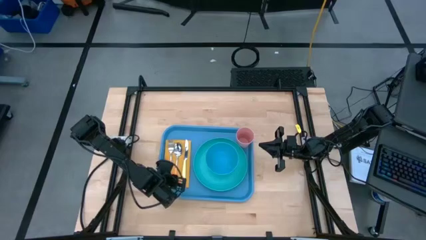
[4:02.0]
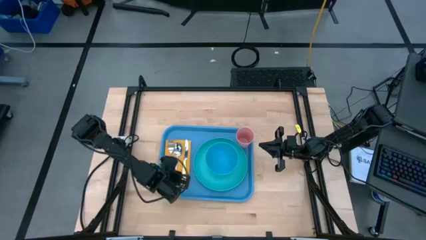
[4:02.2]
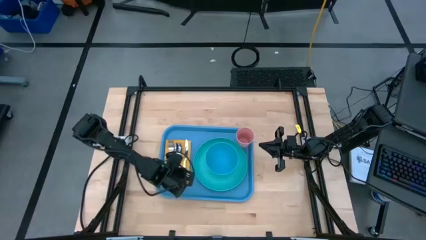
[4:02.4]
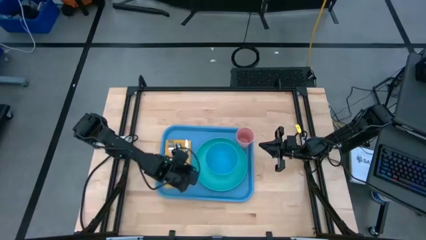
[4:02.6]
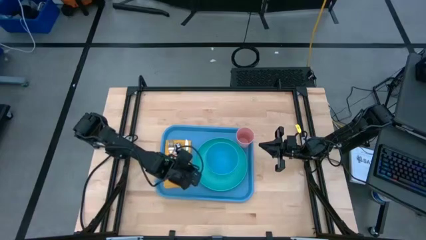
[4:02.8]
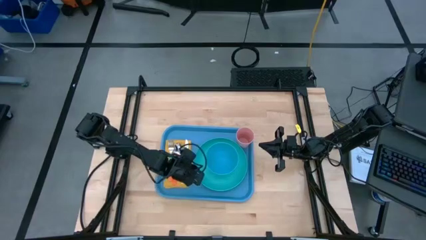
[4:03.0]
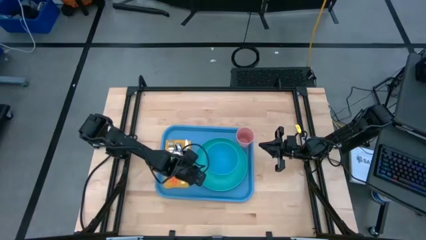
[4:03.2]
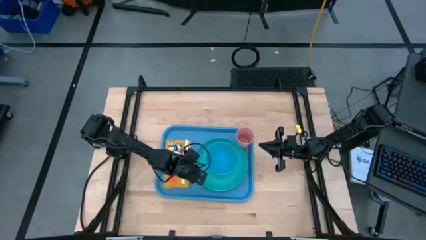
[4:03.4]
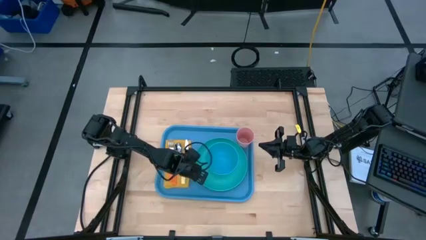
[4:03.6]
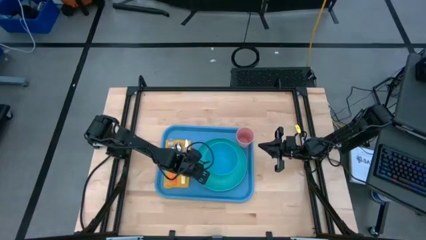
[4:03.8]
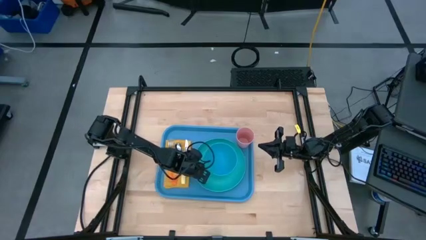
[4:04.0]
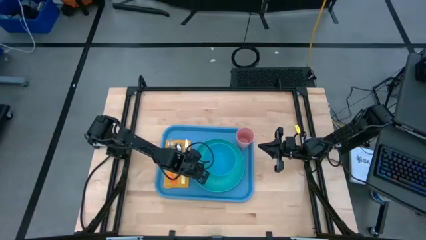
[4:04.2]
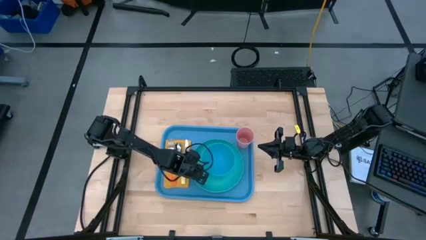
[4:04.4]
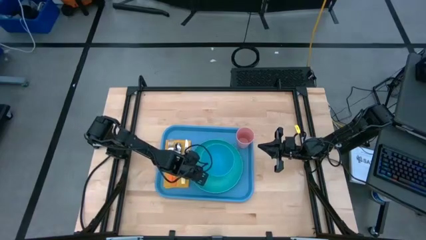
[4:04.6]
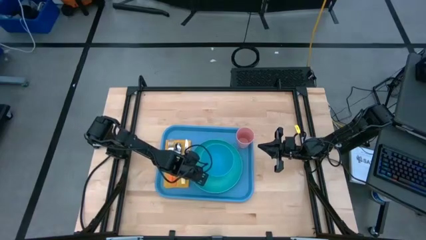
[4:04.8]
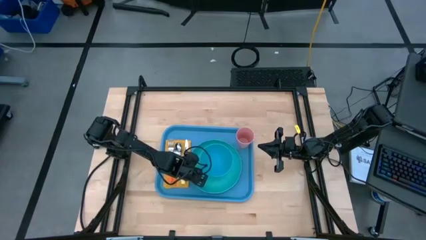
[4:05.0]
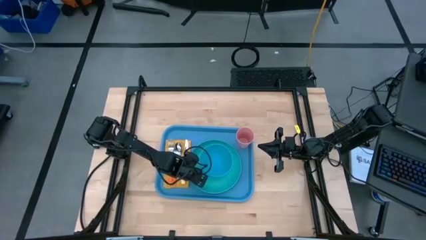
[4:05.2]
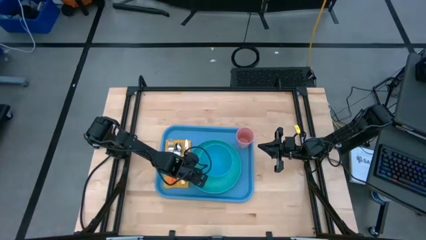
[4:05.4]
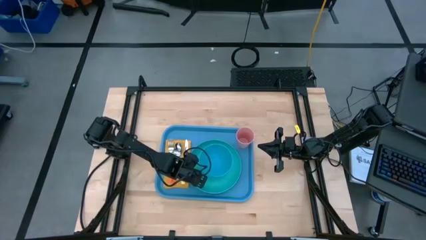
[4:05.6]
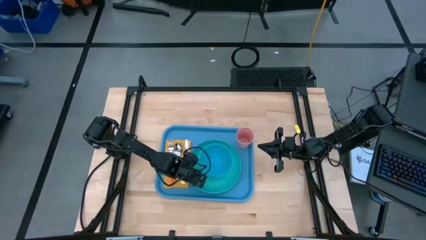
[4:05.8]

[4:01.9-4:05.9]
Task: Set up tray
Adjust the green plate on the blue serving tray

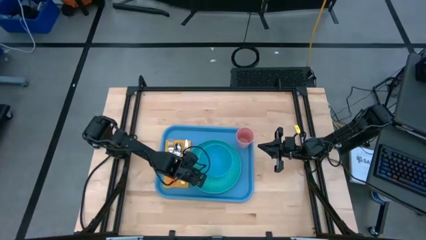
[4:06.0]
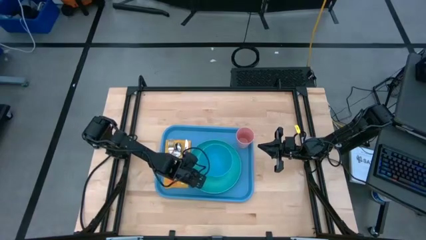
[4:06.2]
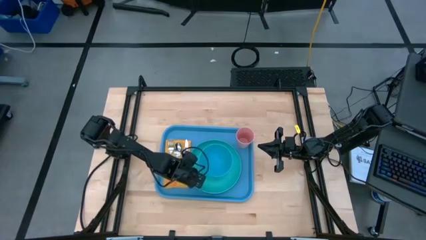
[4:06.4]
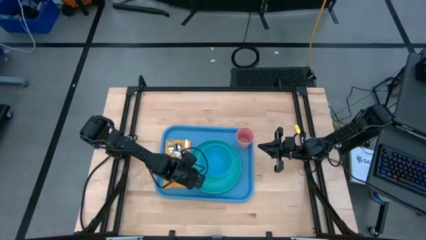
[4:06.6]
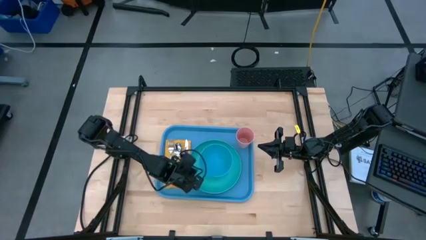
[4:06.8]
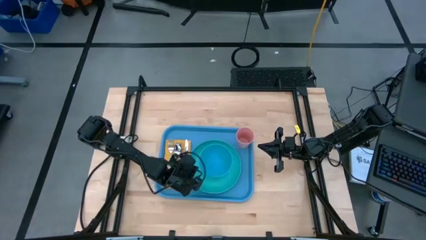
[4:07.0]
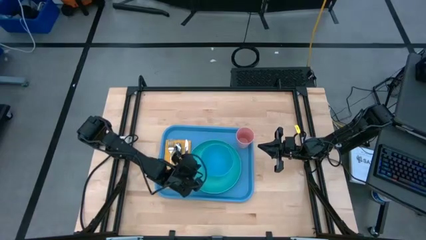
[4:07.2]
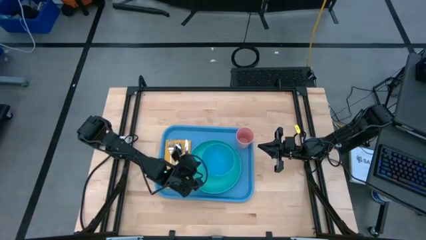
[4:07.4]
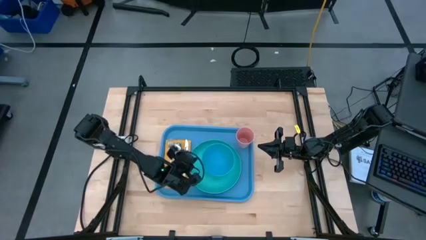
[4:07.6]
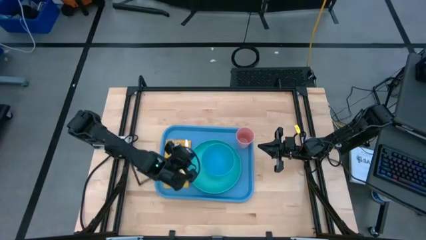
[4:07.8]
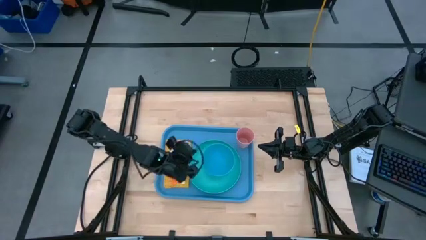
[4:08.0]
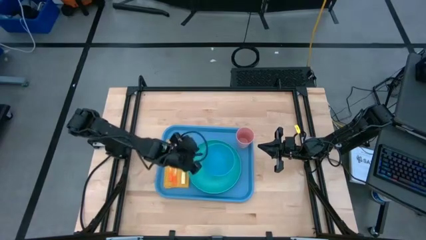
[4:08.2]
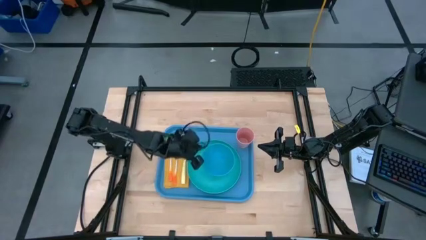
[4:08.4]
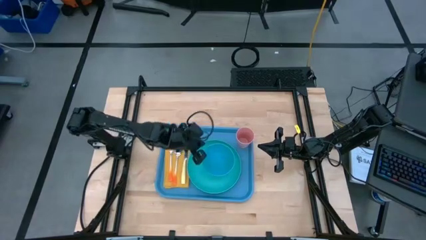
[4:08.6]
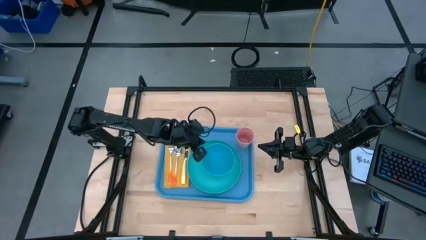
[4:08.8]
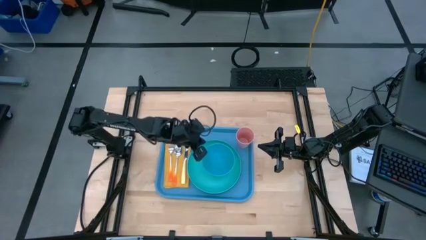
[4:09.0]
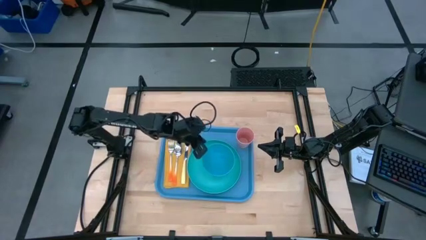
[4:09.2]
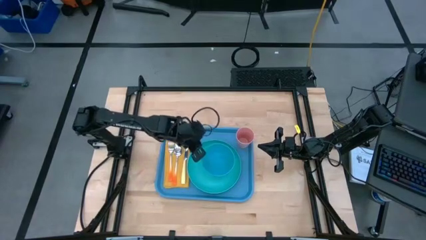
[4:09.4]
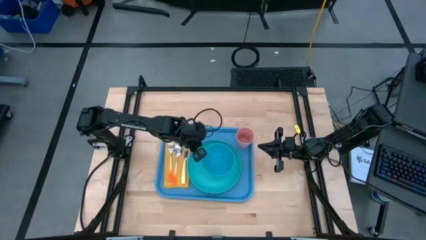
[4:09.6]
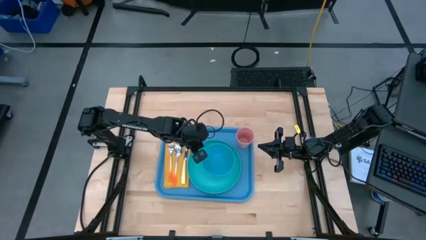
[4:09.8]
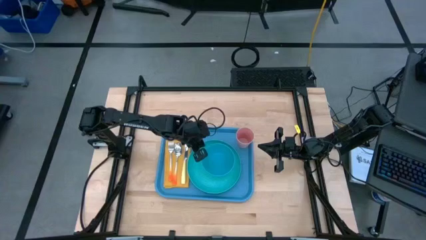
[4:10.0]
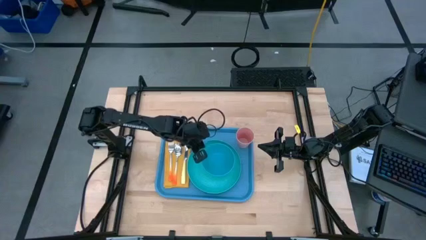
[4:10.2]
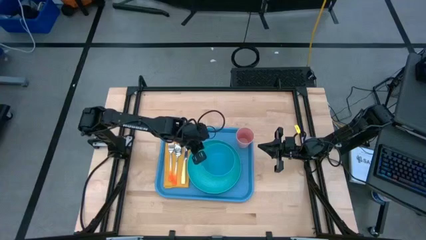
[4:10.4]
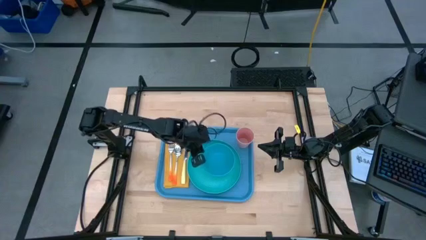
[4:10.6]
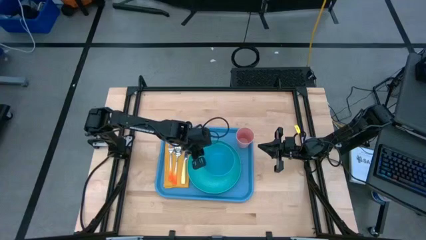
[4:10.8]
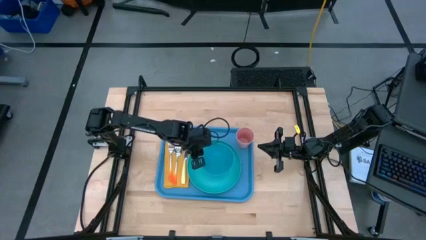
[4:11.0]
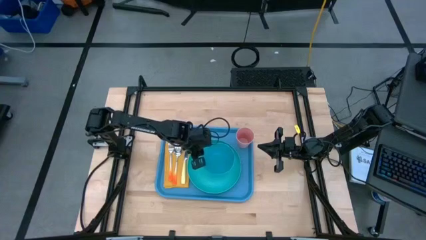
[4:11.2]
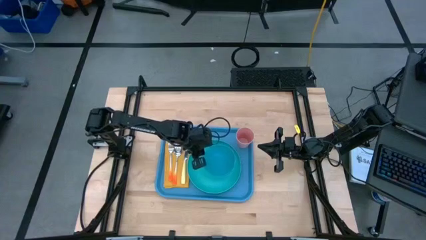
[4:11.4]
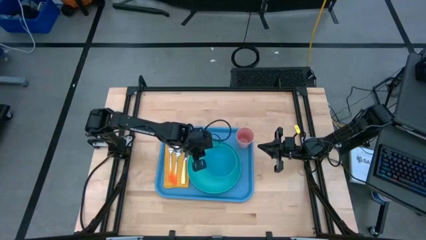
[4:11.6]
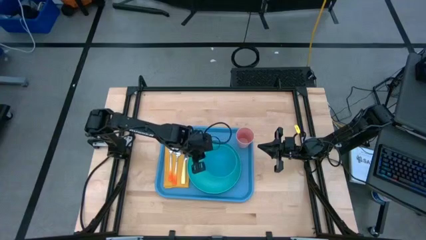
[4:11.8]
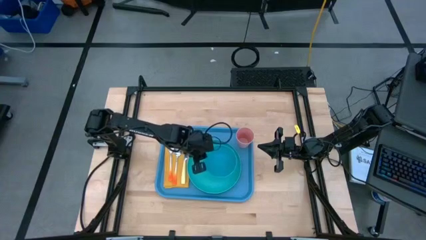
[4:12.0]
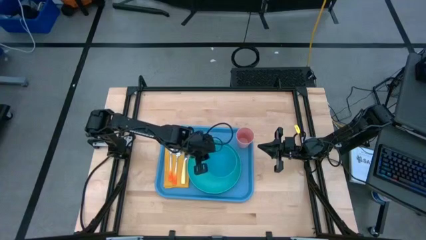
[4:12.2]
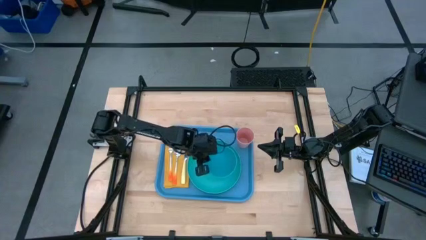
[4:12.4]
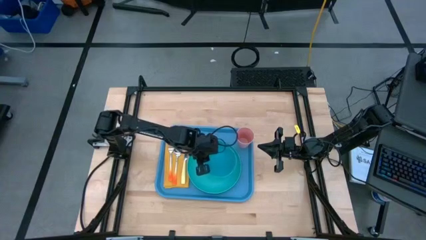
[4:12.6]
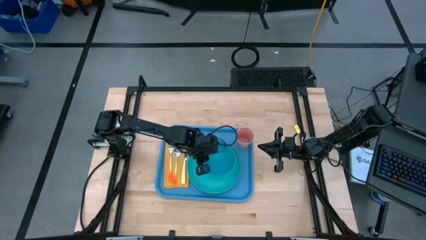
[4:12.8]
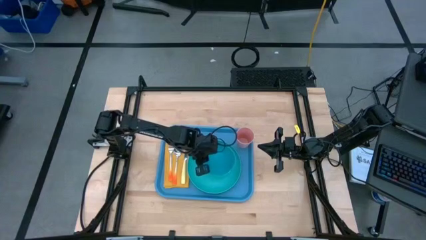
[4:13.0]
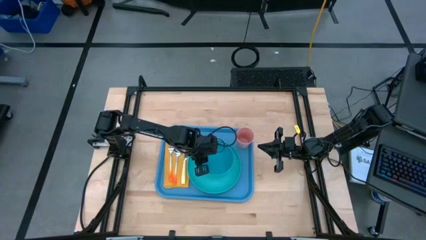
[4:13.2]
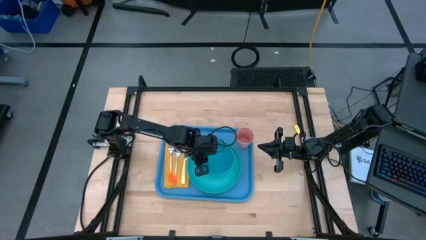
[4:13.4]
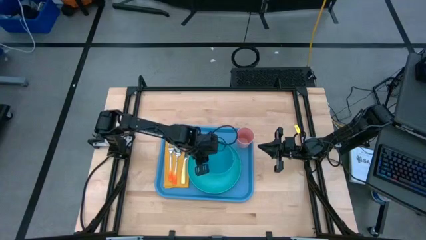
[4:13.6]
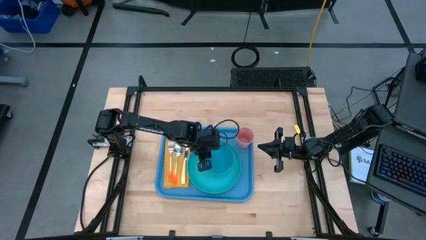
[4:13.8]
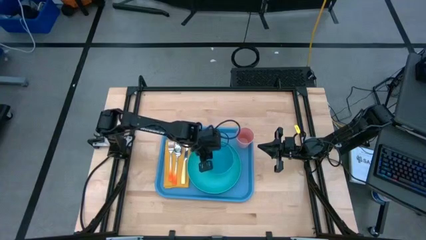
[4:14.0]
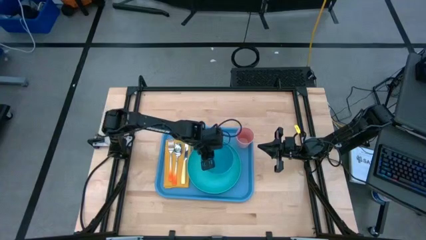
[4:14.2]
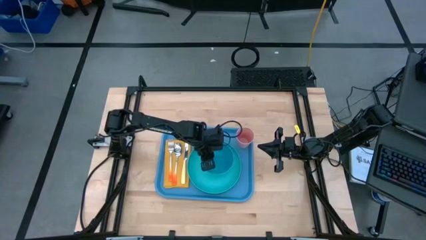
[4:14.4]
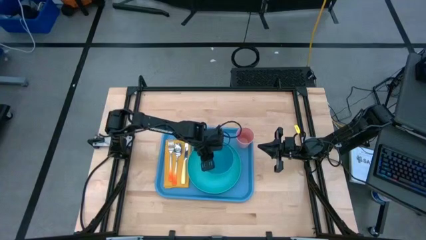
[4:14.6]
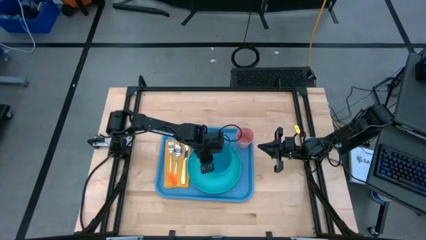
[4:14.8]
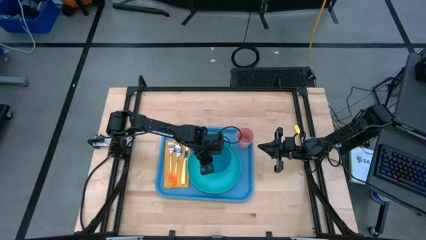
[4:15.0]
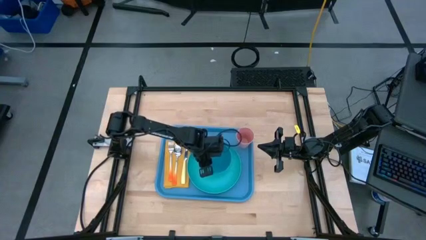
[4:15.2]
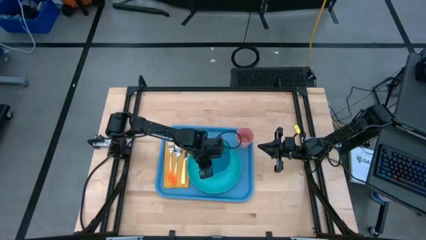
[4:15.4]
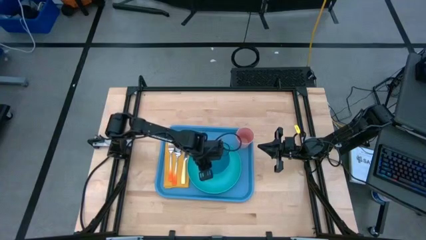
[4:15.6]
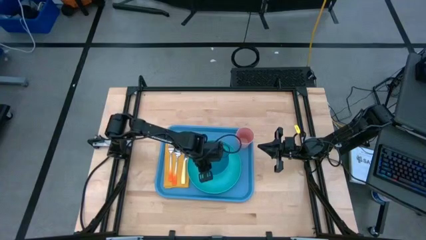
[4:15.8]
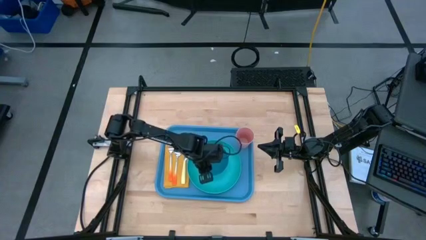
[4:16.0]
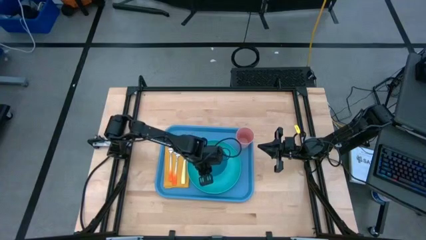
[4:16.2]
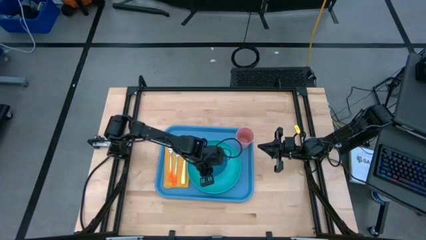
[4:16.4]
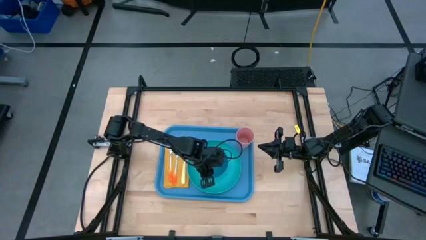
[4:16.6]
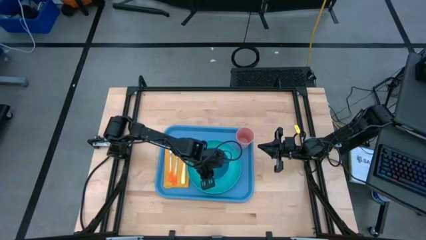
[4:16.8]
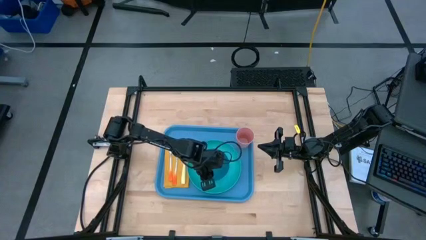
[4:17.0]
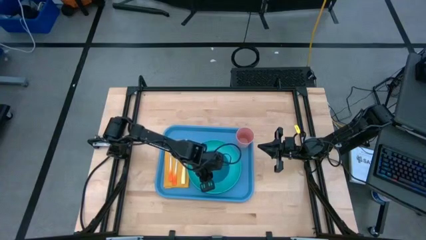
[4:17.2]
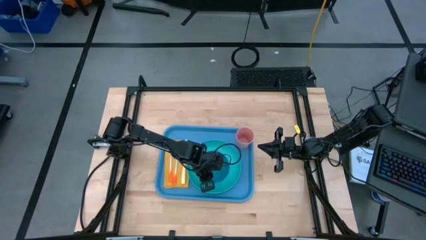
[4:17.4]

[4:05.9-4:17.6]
Adjust the blue bowl on the green plate
